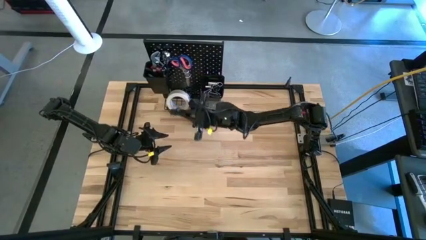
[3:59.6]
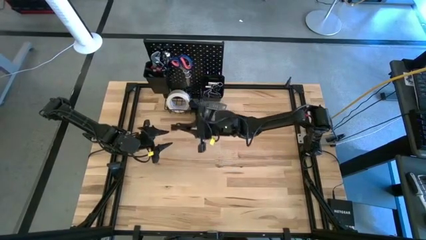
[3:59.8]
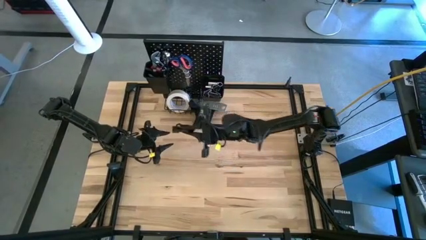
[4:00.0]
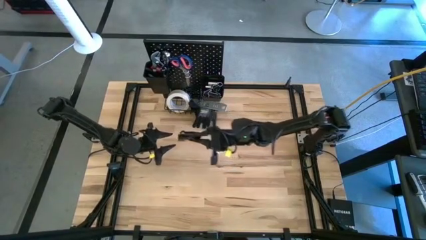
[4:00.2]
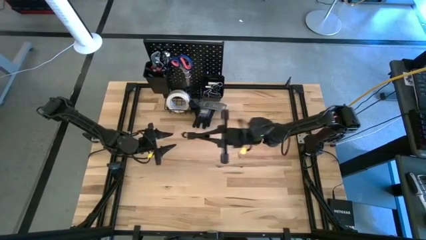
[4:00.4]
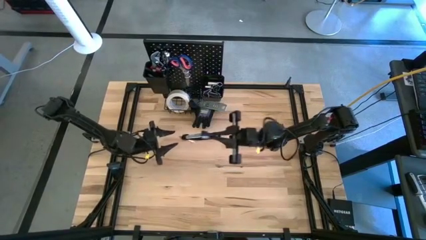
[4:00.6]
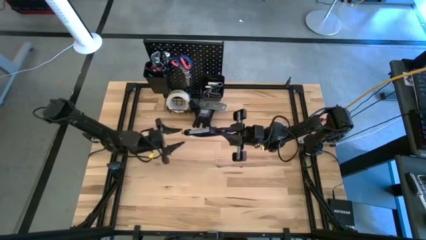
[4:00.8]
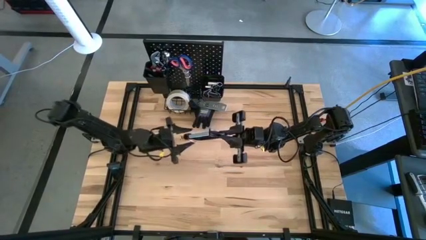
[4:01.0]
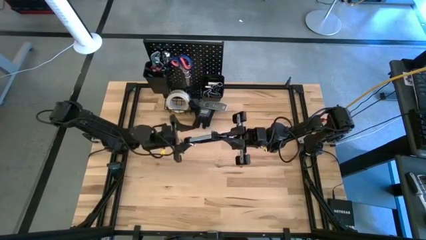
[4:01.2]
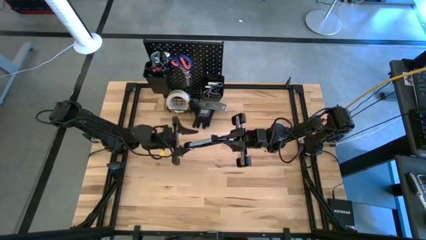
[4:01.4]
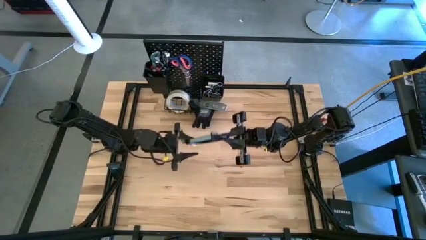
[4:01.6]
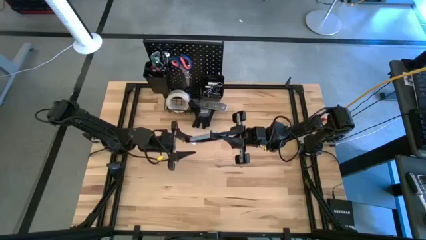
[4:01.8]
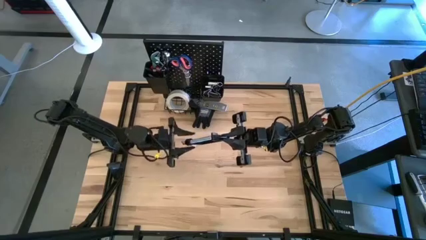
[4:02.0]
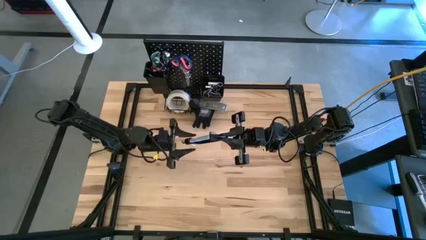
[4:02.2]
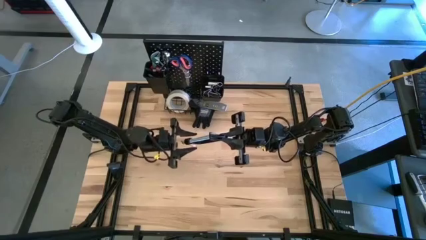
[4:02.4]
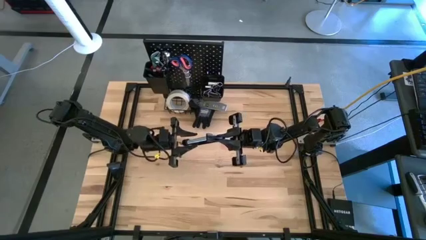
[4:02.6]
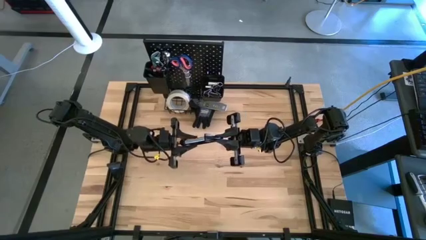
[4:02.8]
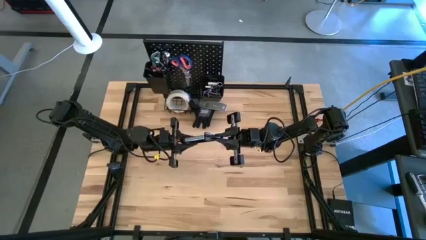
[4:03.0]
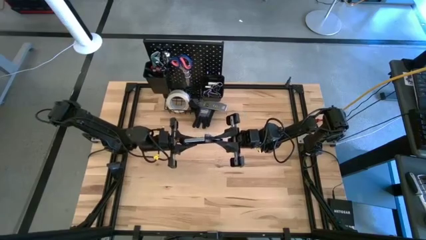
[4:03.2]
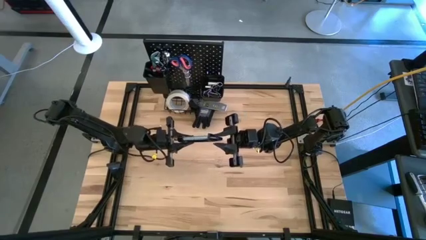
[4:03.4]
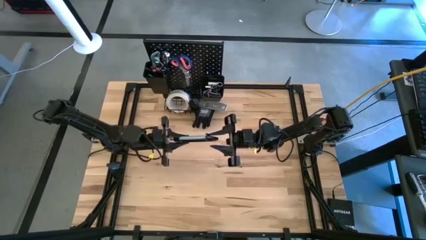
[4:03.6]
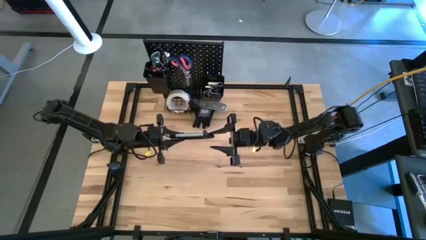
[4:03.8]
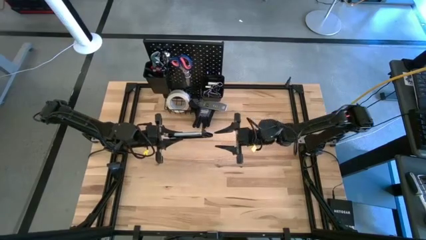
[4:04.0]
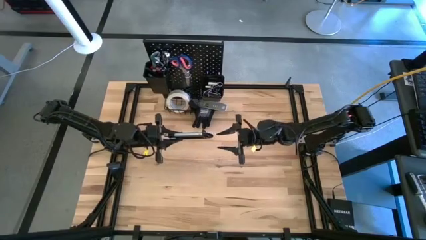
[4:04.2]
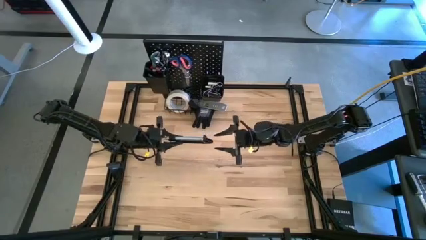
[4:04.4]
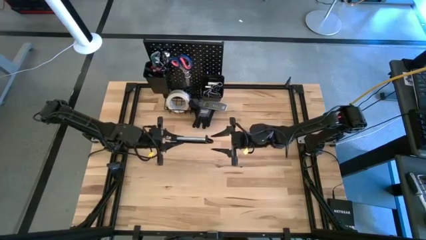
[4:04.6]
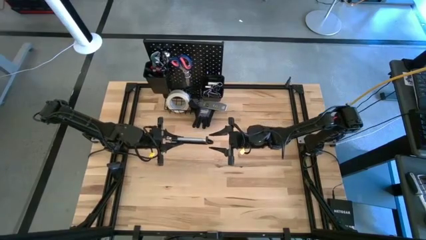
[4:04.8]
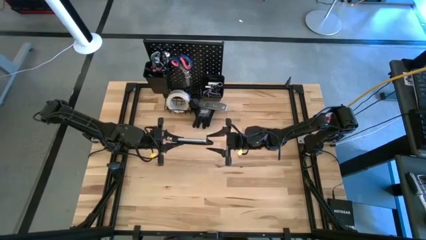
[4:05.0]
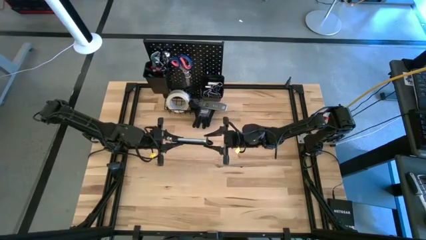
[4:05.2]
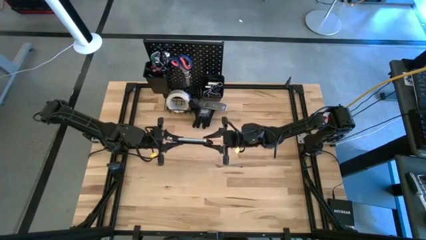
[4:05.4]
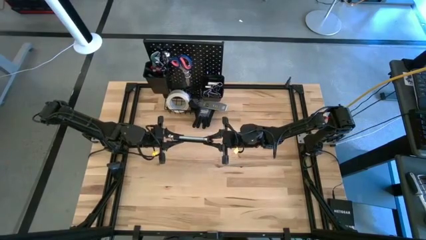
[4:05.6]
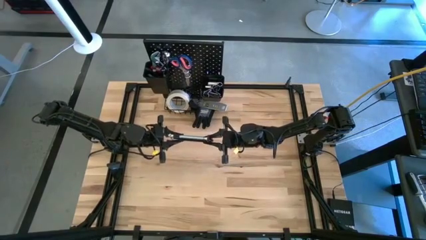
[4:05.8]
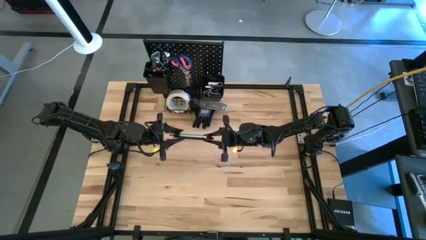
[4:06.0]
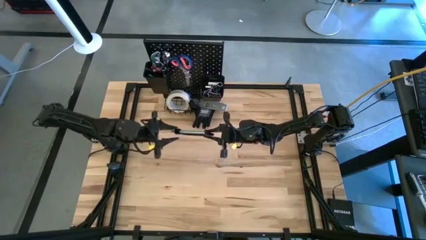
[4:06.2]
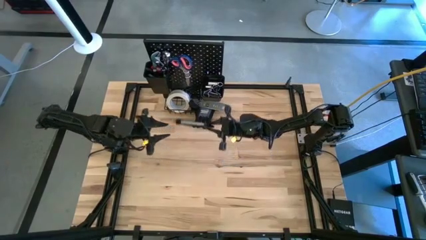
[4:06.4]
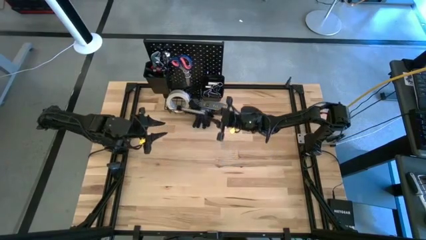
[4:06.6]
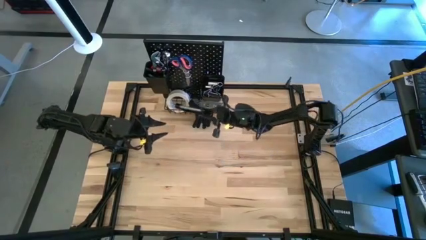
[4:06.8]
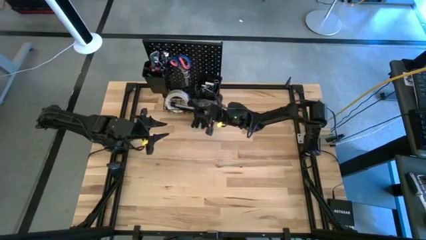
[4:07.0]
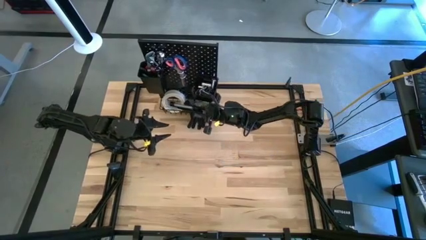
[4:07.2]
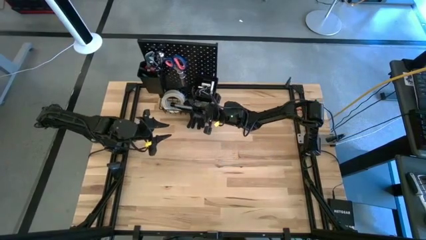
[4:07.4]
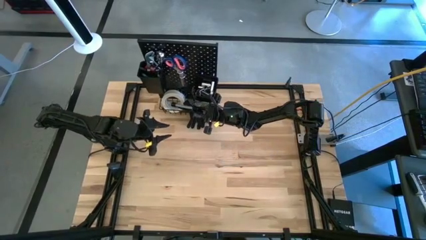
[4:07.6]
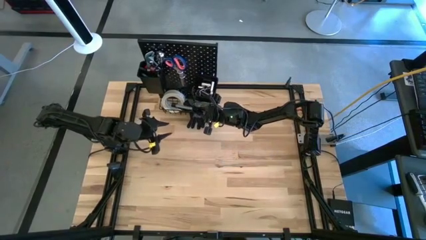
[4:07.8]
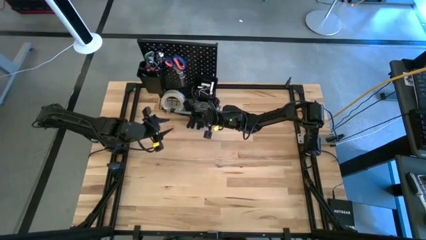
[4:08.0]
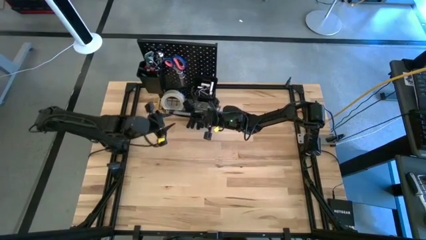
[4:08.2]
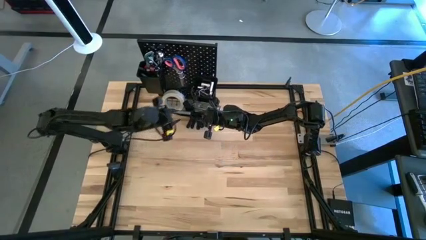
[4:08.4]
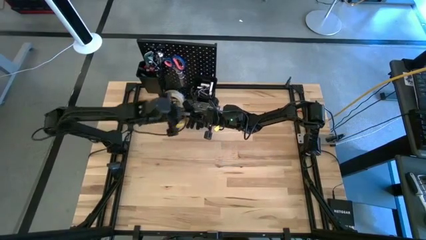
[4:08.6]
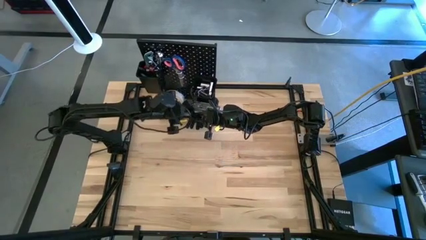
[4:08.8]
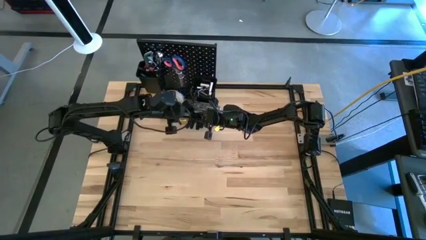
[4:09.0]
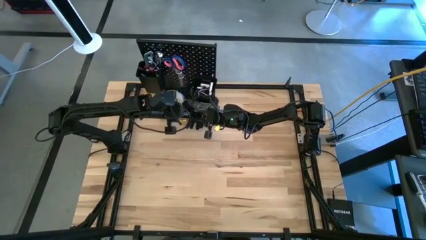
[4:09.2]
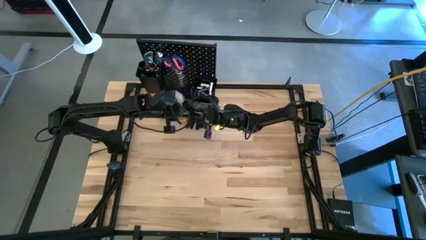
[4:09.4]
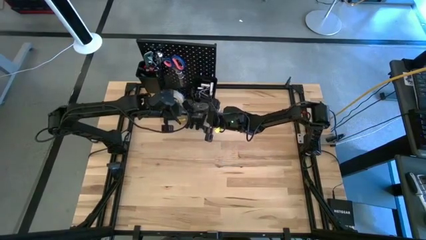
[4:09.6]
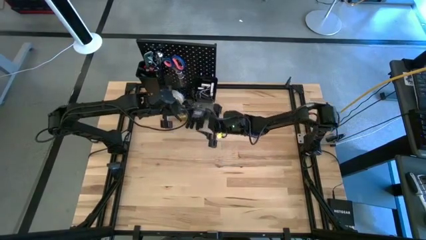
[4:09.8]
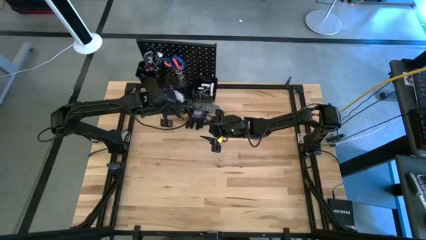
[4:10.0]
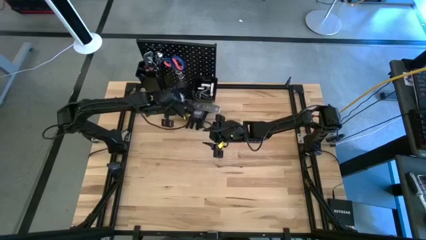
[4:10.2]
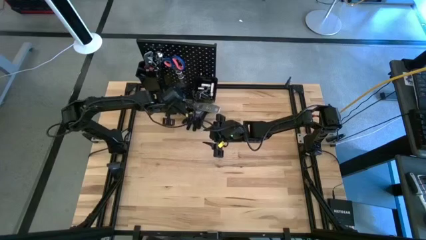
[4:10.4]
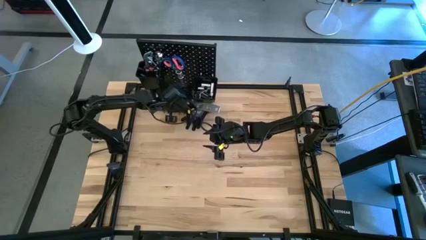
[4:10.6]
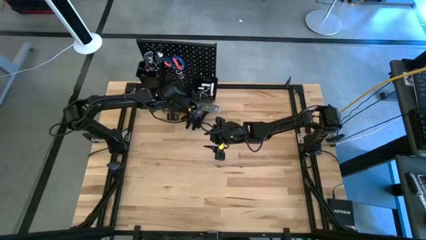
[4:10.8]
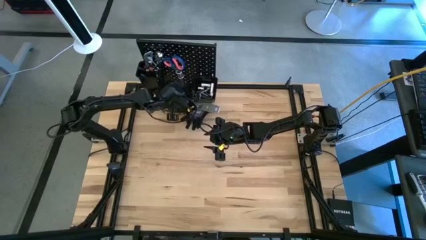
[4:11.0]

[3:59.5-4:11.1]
Task: Hang tools onto peg board
Put the clamp into the wire basket on the pegboard

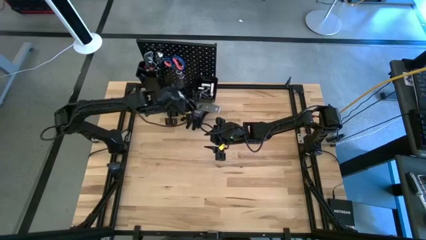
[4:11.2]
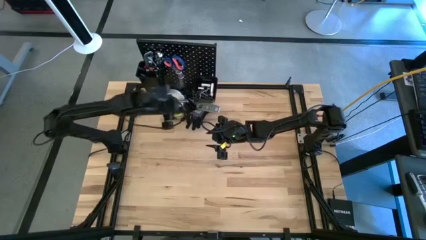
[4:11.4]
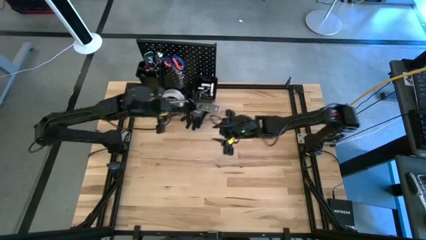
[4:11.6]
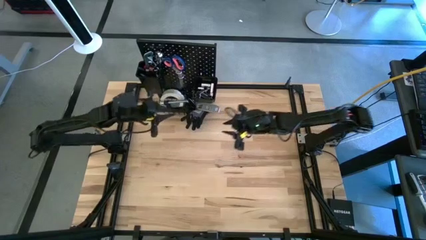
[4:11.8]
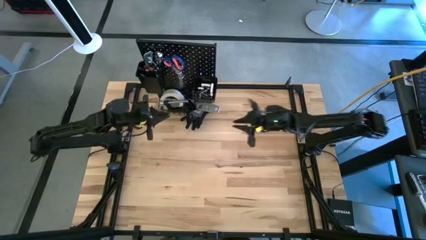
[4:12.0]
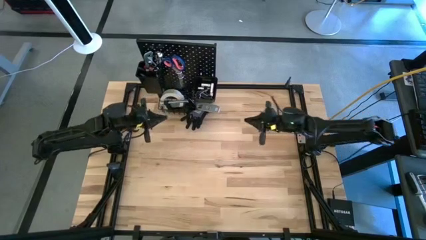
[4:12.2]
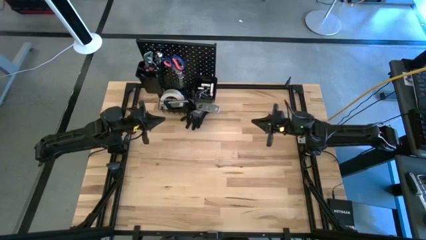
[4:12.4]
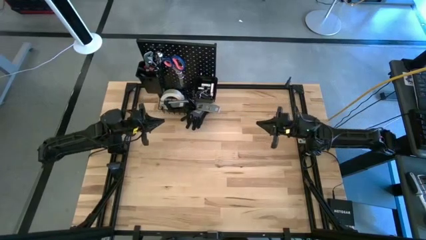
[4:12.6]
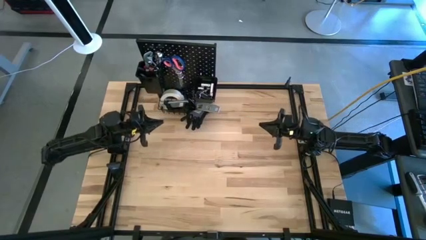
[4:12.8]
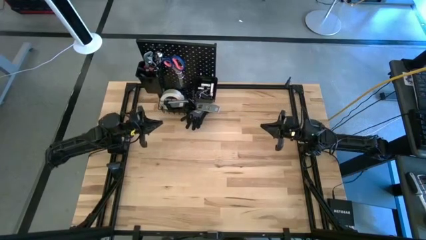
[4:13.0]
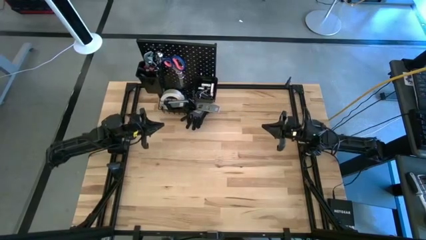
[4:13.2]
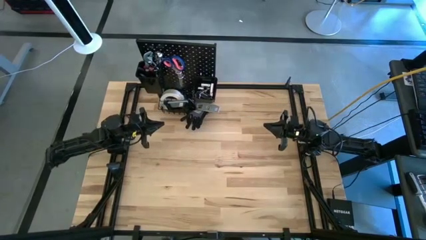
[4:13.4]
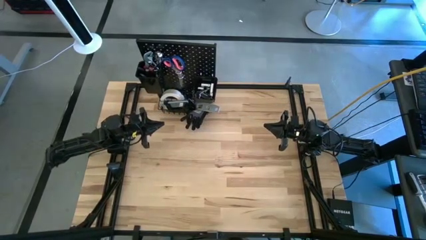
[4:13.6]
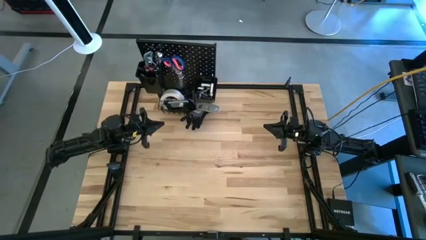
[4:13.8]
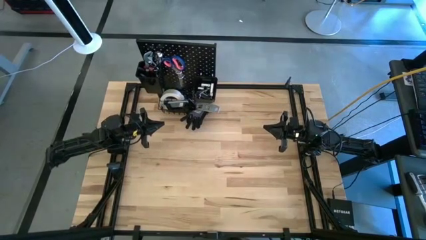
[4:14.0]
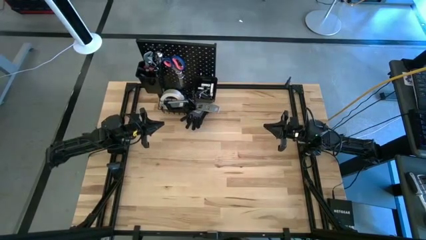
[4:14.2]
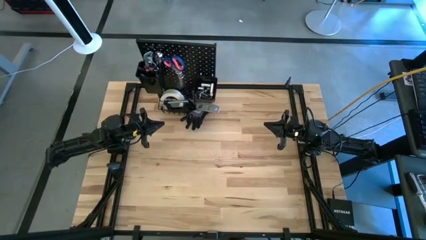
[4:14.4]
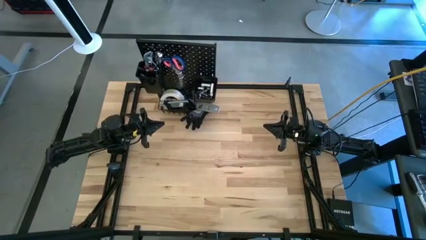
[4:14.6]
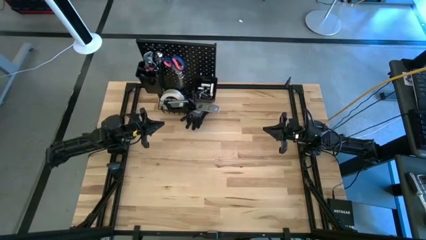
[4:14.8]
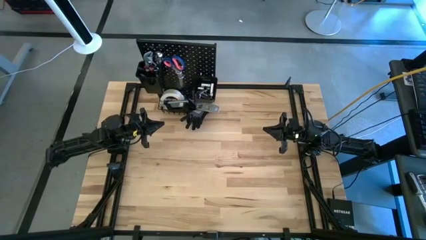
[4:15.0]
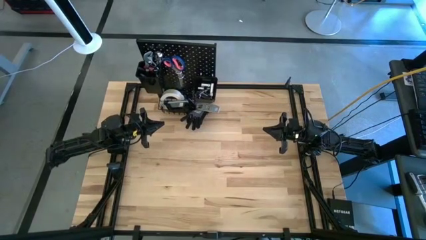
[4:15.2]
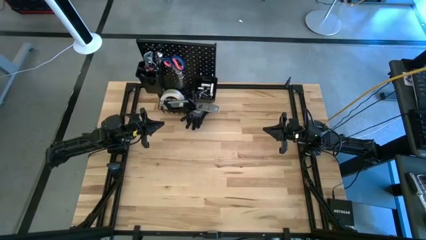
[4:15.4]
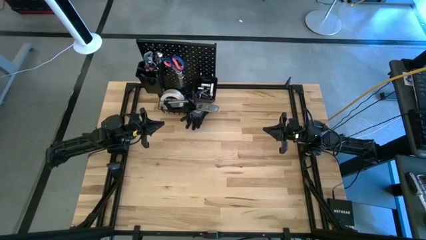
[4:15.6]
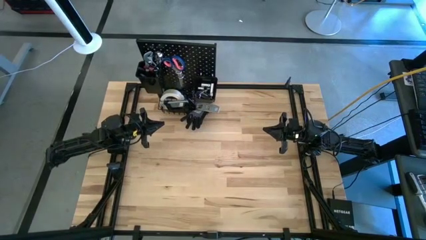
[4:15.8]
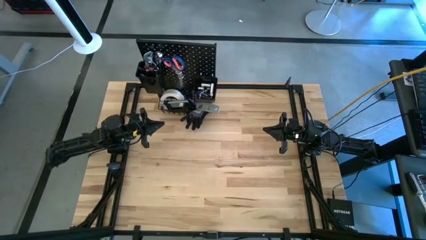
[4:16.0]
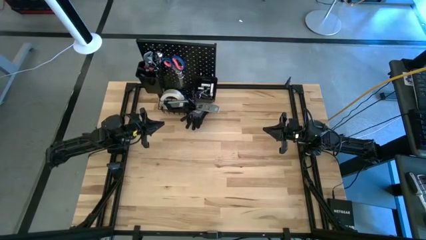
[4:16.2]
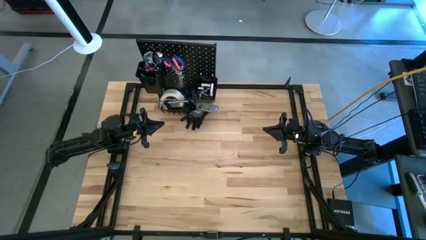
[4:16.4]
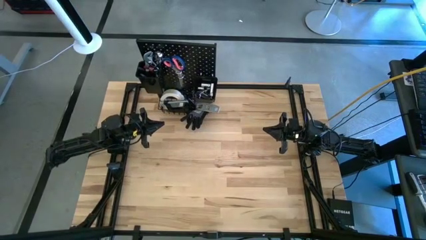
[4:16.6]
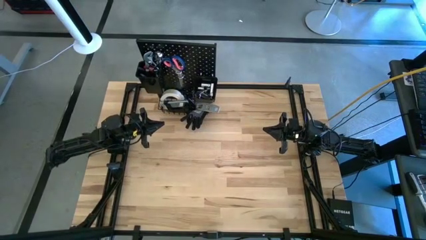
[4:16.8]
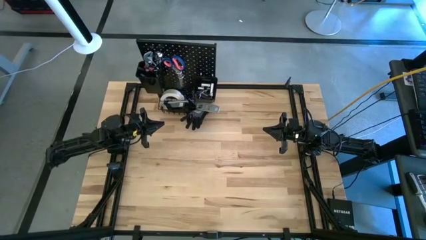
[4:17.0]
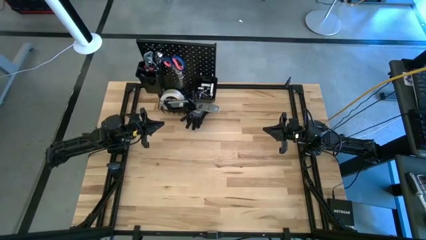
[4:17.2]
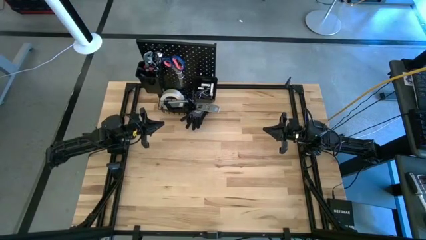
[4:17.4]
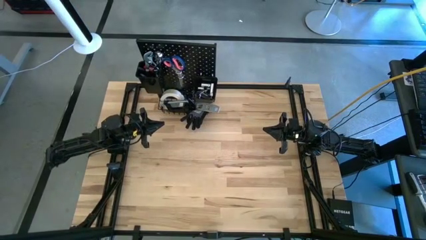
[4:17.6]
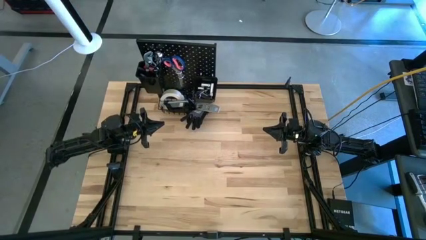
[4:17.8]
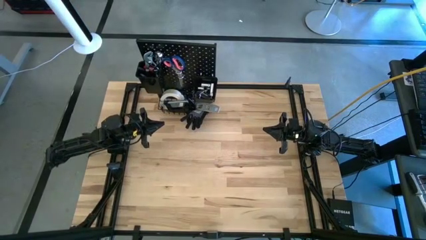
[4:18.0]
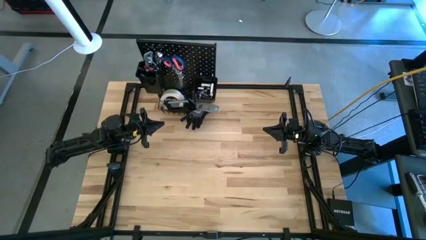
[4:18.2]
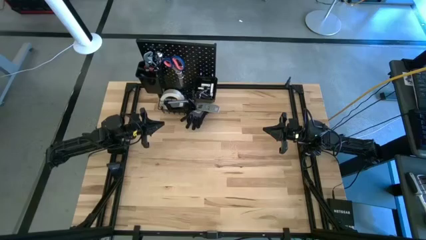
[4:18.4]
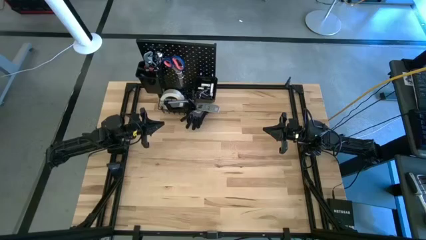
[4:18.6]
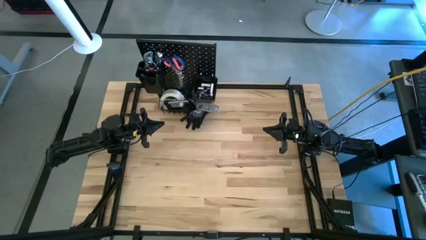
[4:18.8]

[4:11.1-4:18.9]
Return to Home Position
